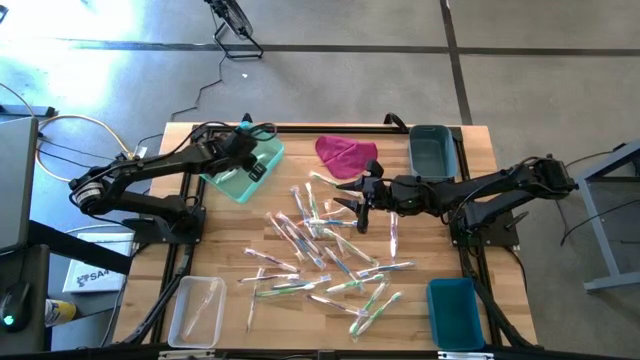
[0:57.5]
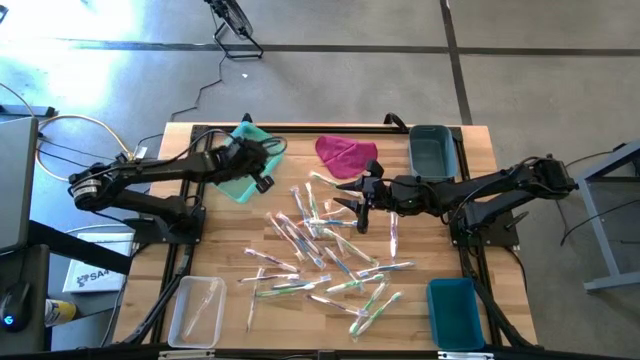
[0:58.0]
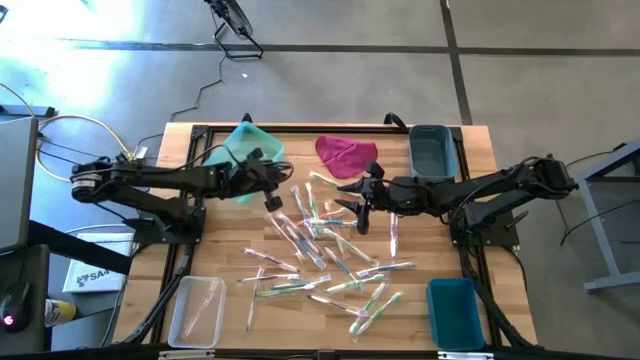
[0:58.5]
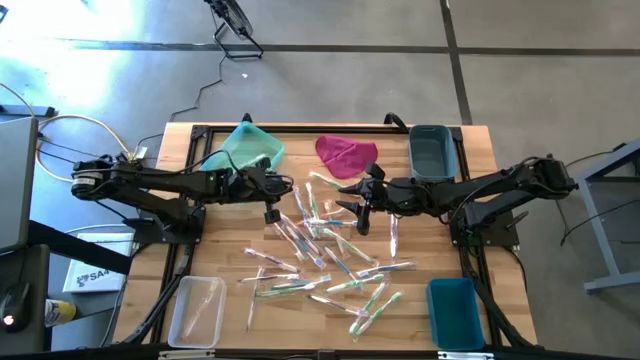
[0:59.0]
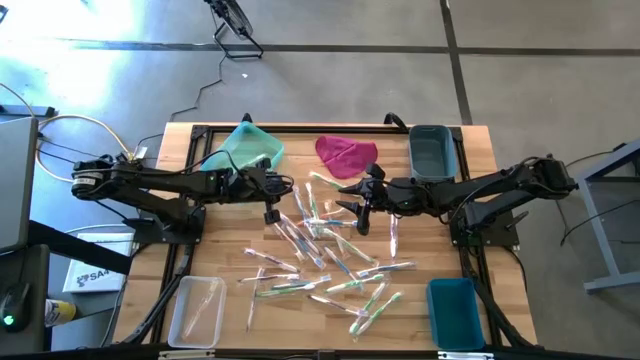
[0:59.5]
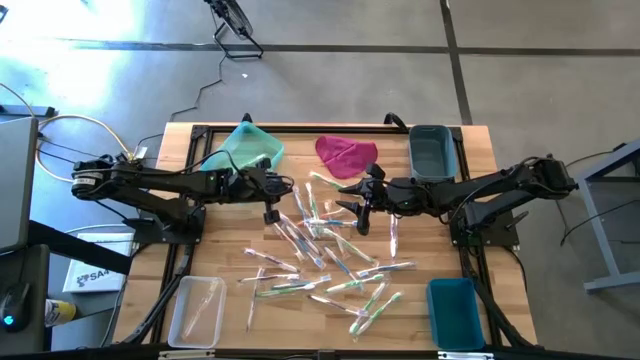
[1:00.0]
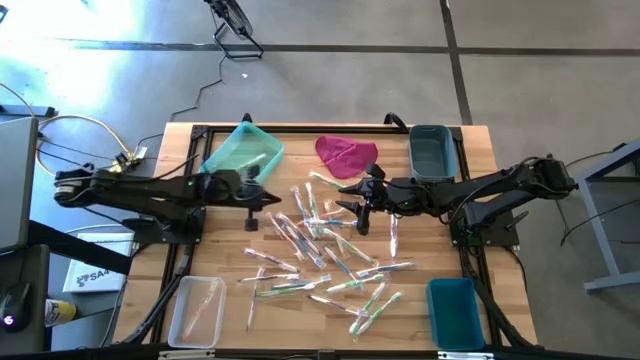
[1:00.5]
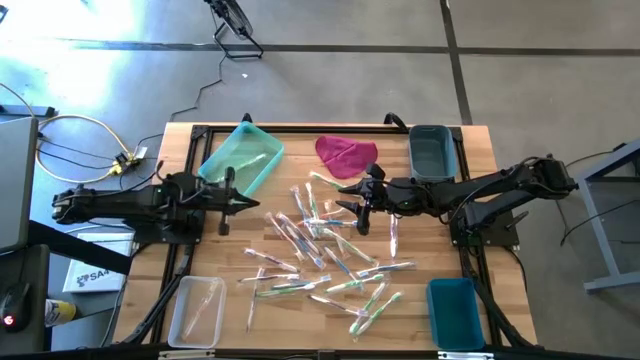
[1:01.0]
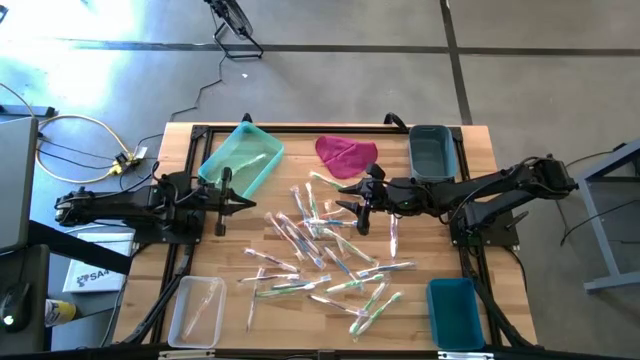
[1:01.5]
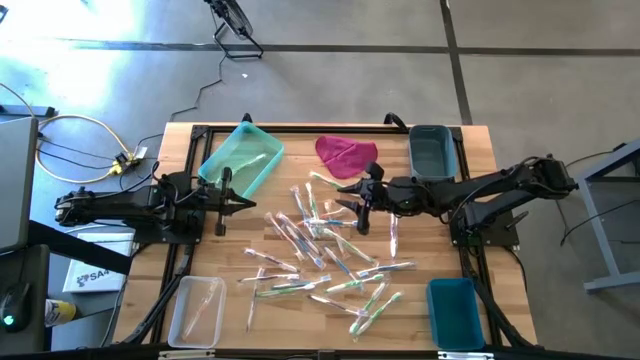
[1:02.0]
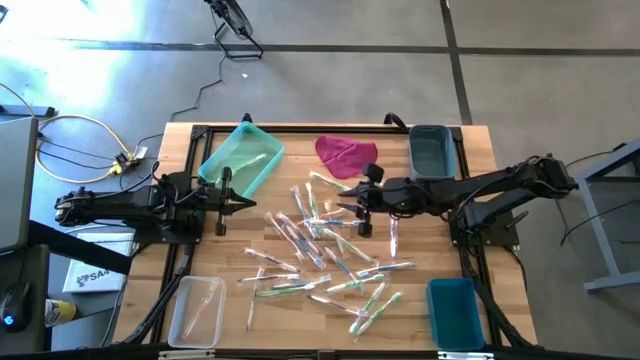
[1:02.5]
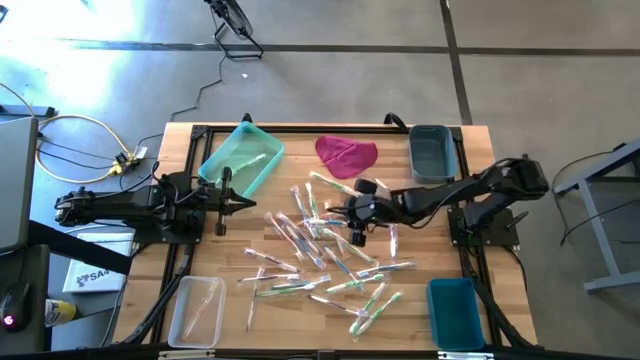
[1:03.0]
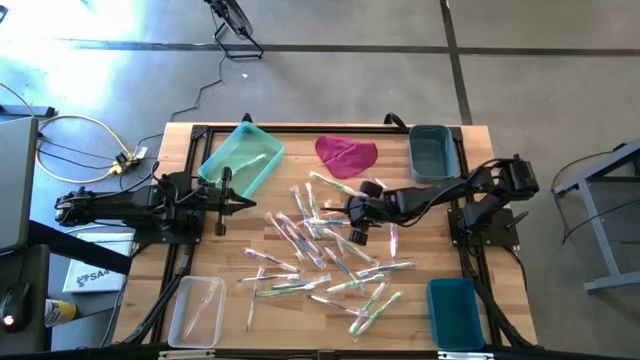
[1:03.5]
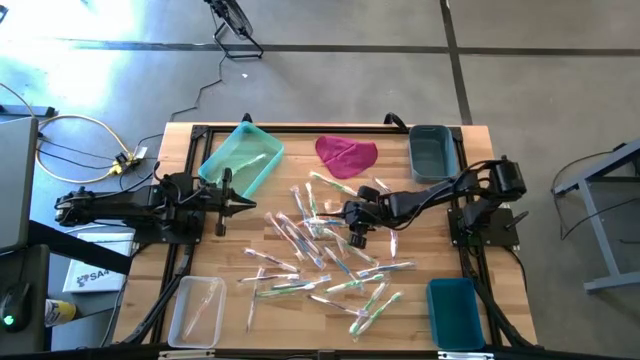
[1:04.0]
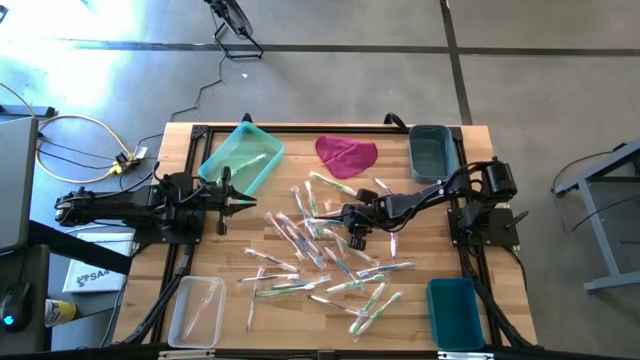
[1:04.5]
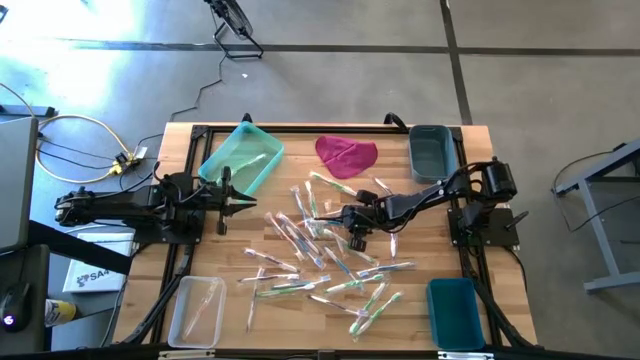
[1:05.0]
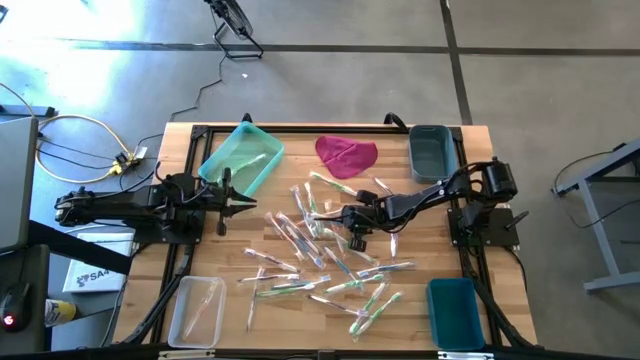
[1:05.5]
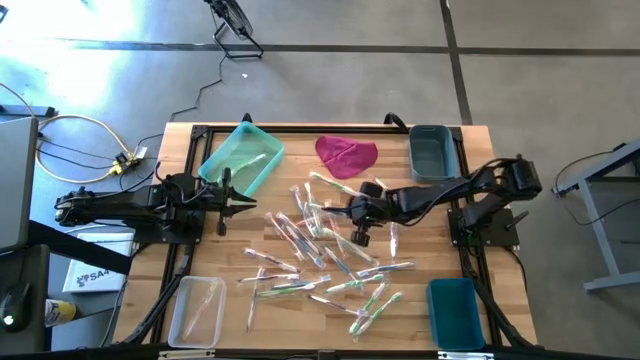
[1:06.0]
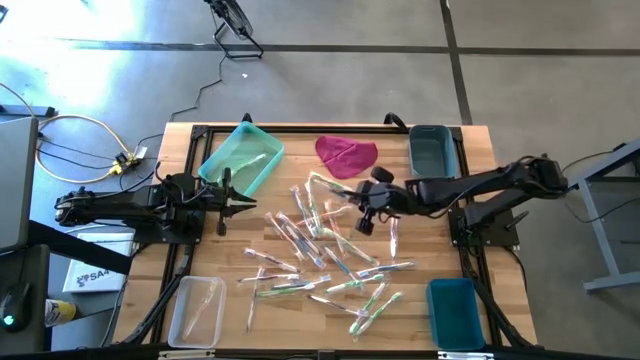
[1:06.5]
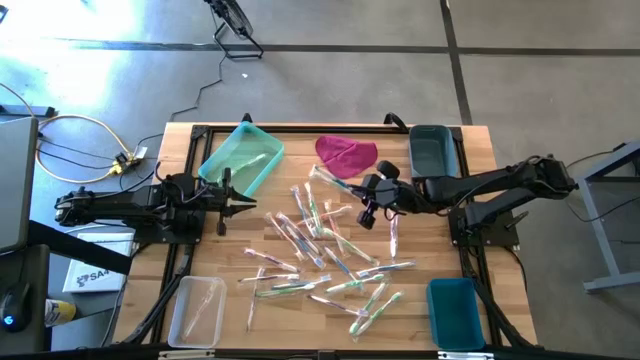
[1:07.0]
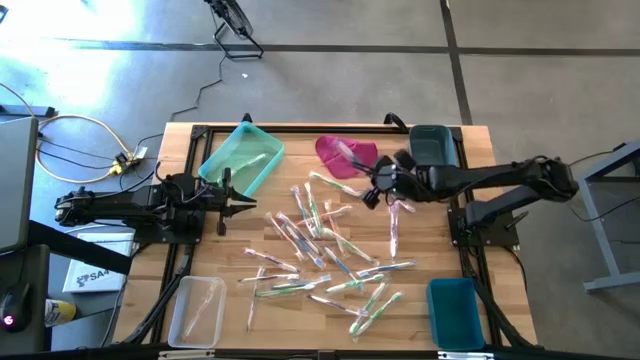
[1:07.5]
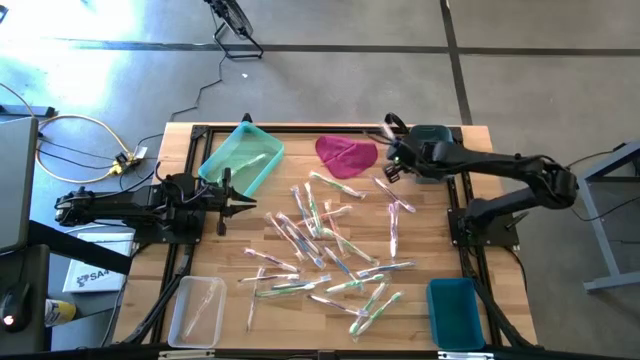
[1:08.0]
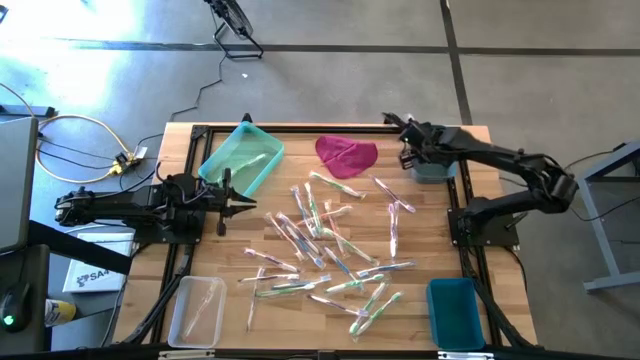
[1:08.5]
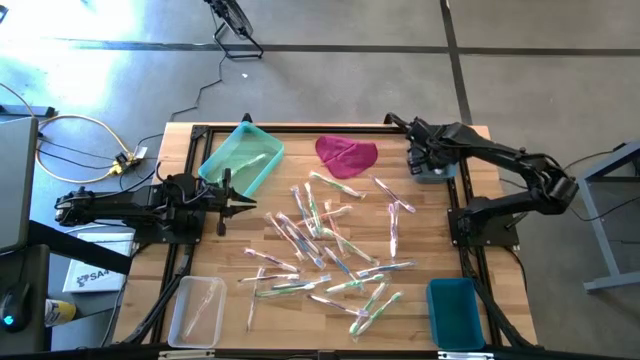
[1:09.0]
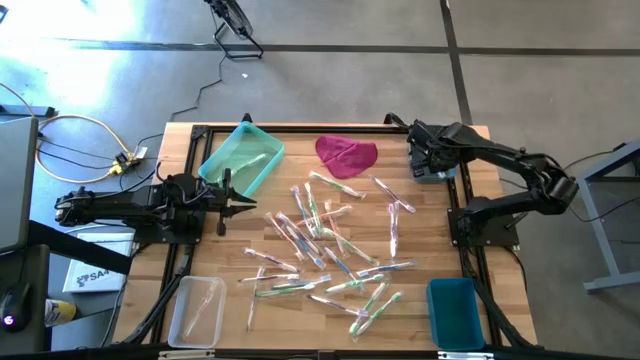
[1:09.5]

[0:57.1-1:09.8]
Task: Pick & Place Toothbrushes
Put the blue toothbrush to the light blue bin

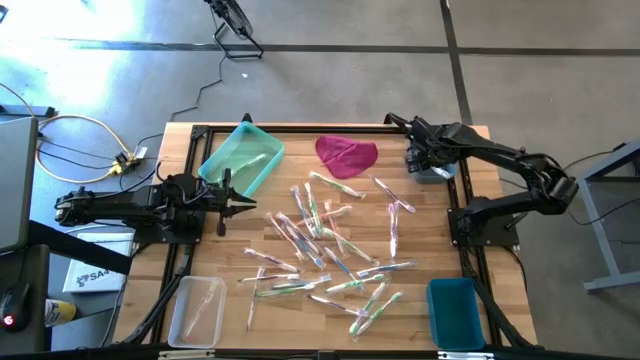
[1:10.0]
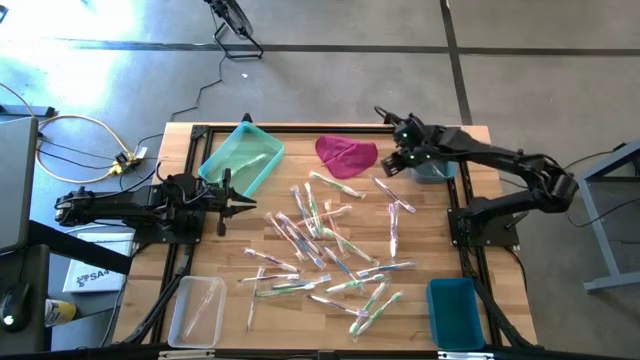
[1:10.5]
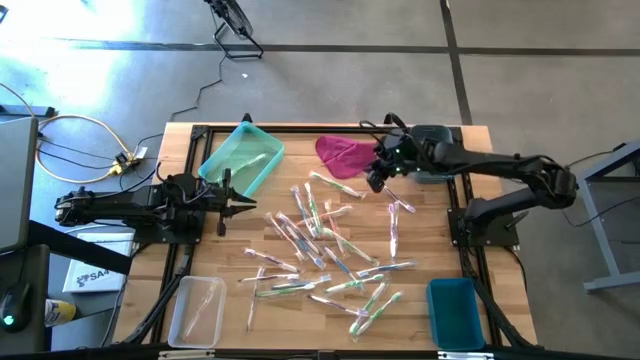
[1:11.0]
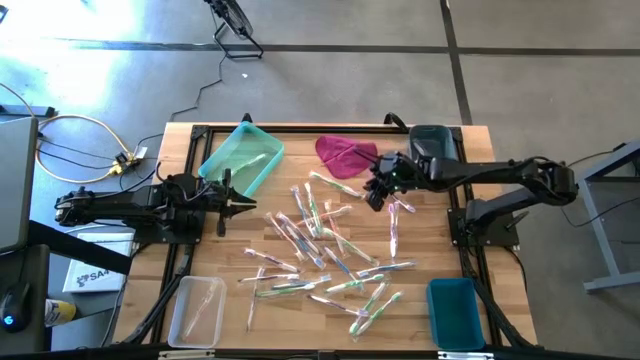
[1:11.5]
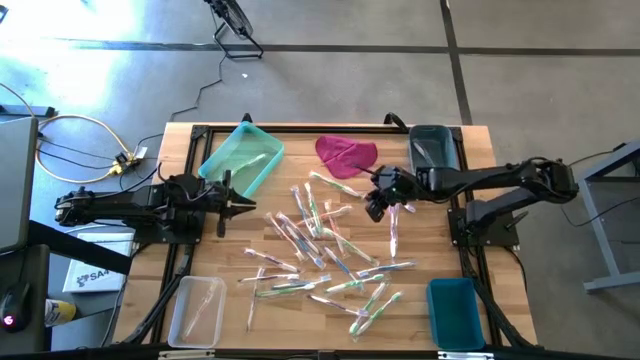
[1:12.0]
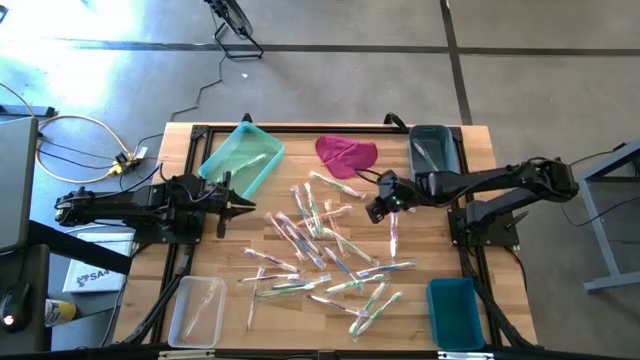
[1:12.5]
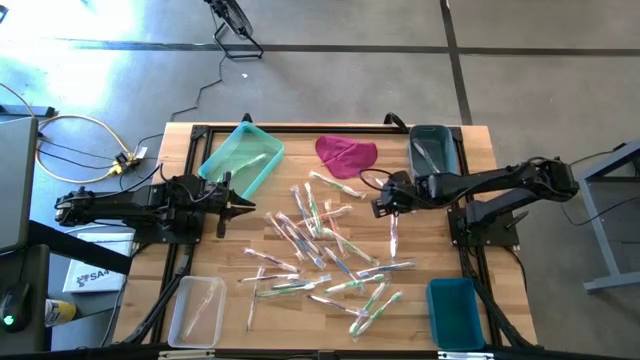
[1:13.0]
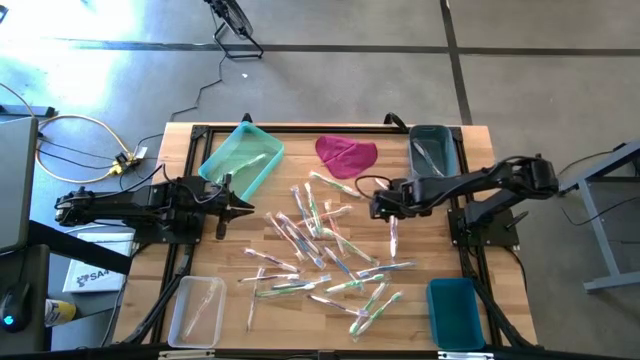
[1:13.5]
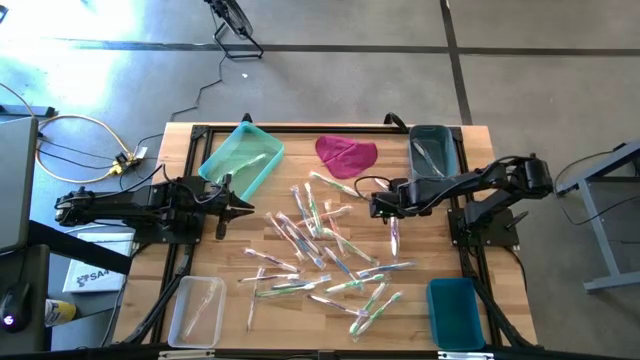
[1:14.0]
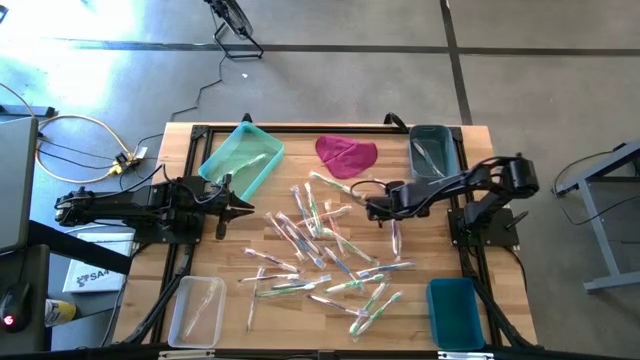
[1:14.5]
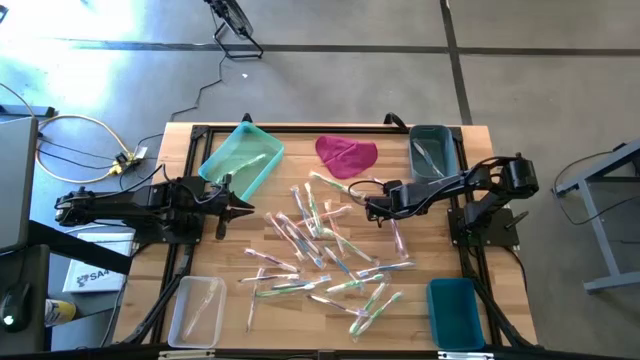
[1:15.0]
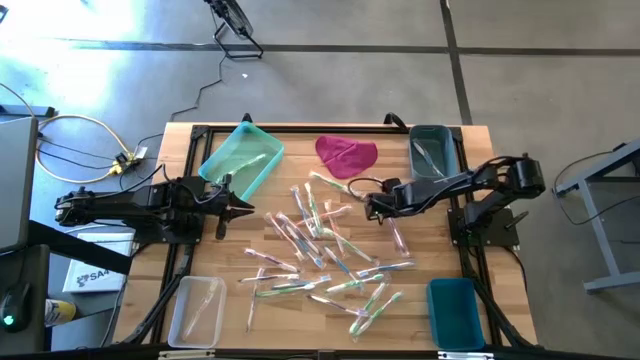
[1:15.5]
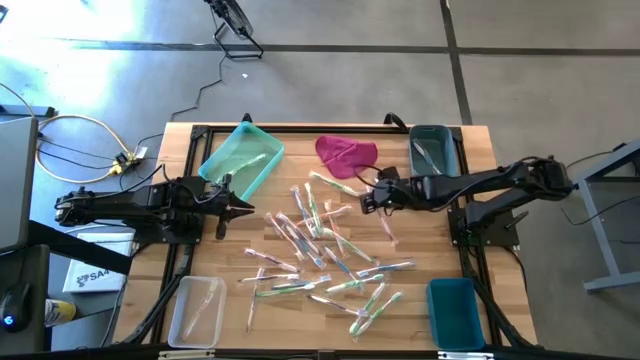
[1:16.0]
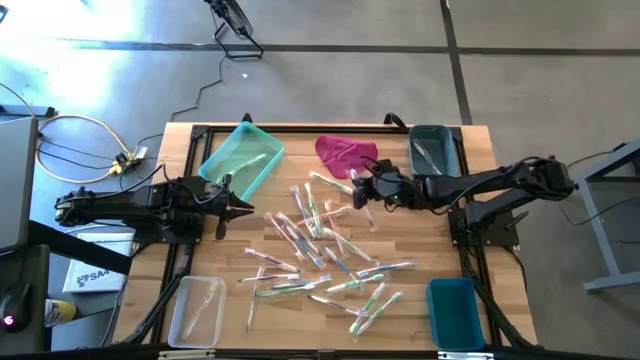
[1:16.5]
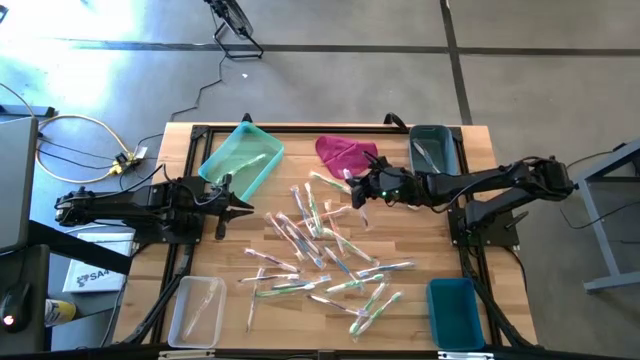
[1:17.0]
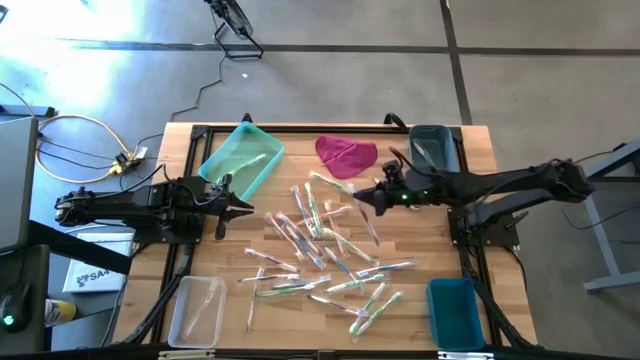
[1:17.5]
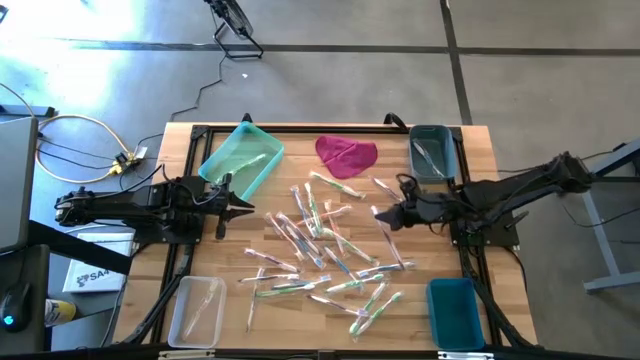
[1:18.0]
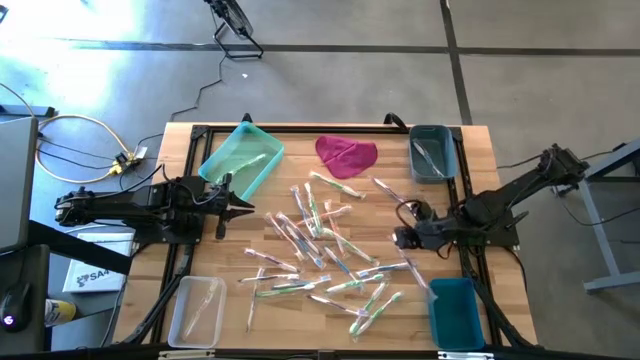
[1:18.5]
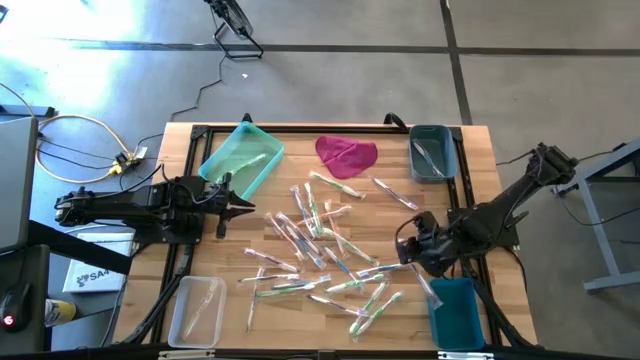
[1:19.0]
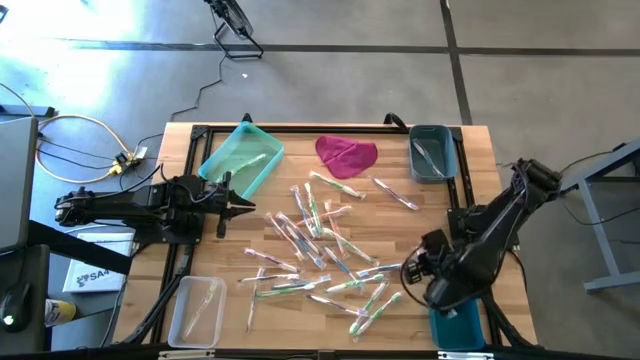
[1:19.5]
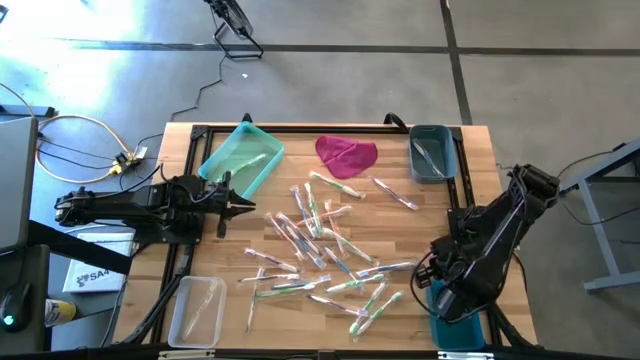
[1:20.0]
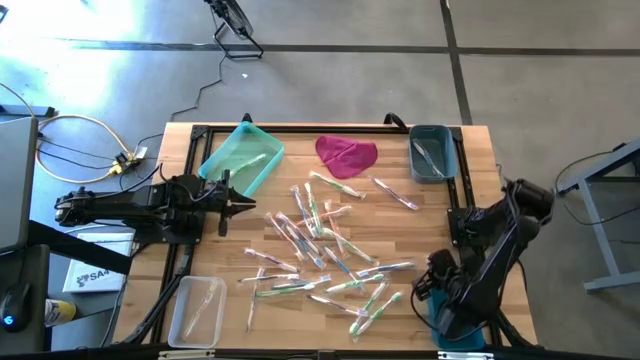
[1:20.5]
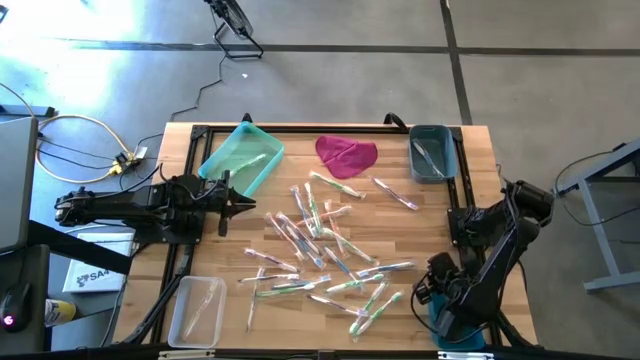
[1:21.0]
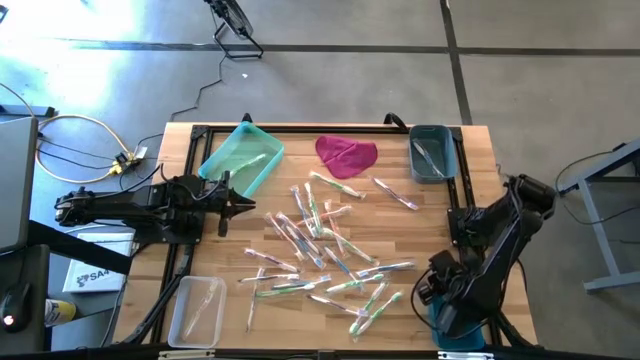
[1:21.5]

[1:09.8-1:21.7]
Put the purple toothbrush to the dark blue bin bin
